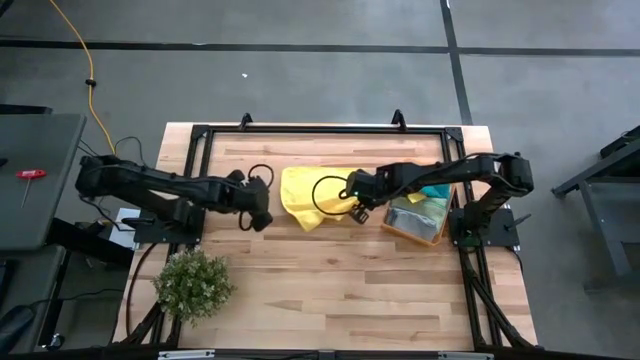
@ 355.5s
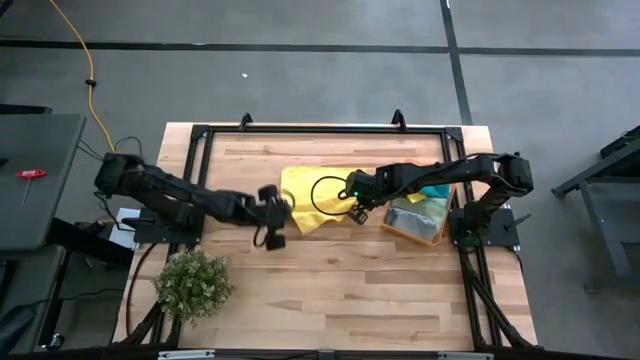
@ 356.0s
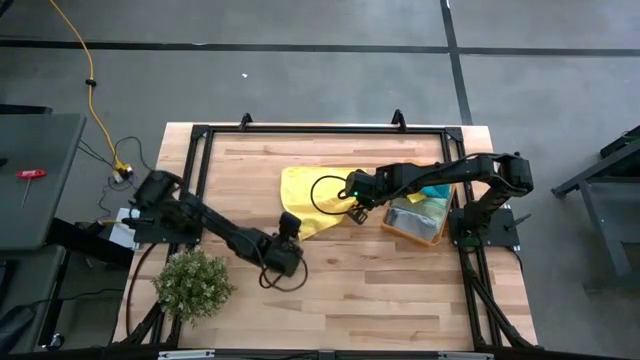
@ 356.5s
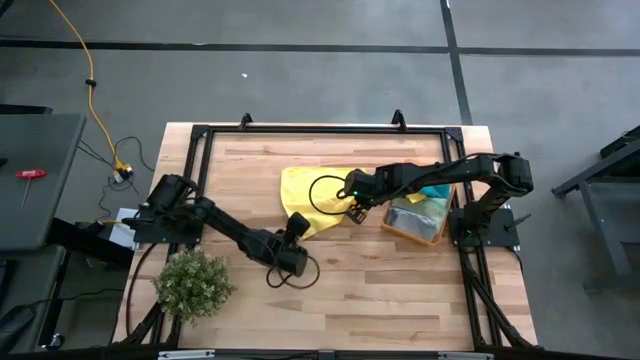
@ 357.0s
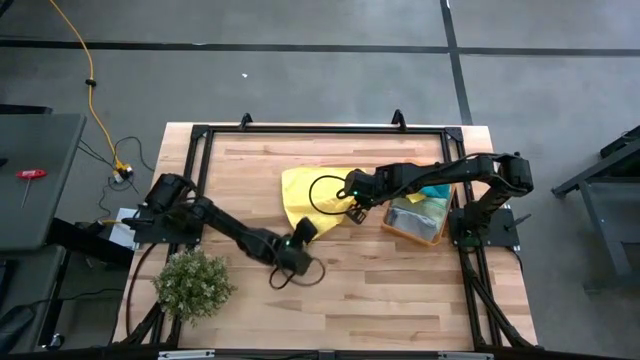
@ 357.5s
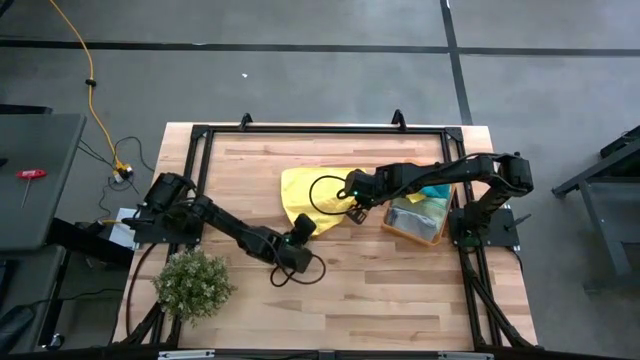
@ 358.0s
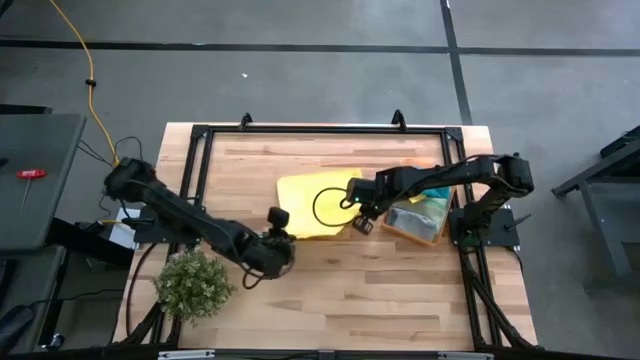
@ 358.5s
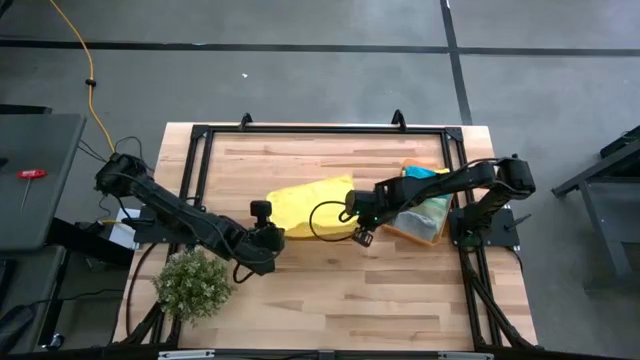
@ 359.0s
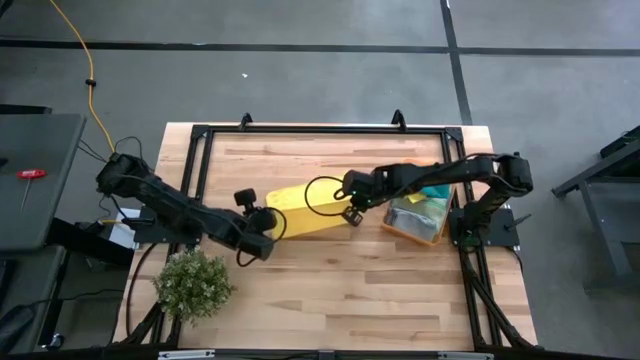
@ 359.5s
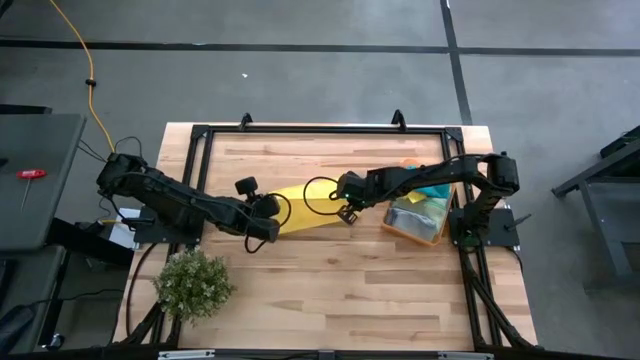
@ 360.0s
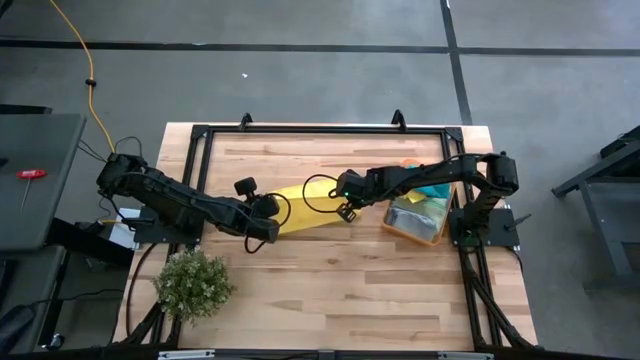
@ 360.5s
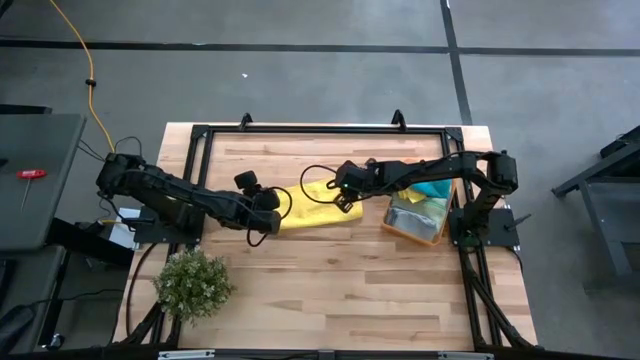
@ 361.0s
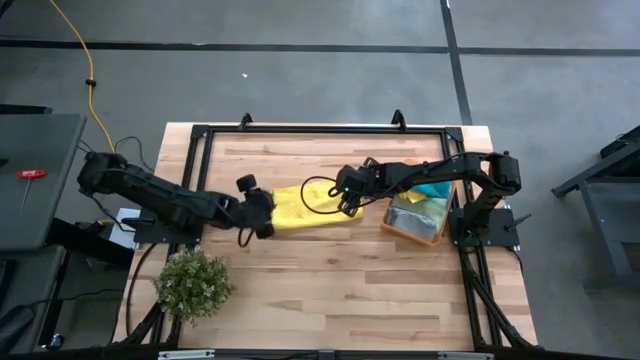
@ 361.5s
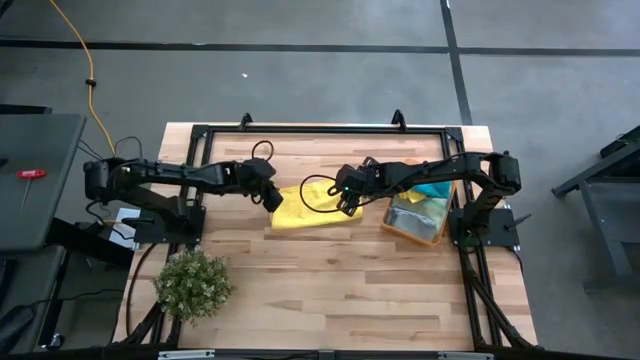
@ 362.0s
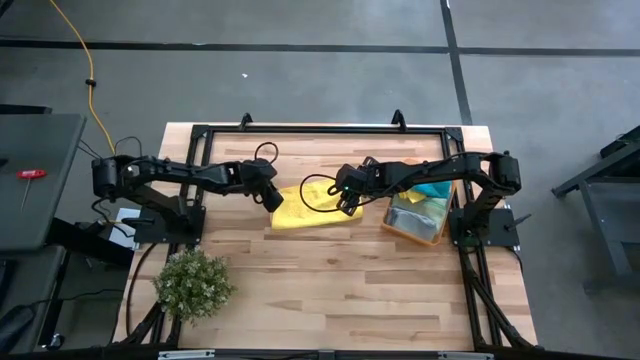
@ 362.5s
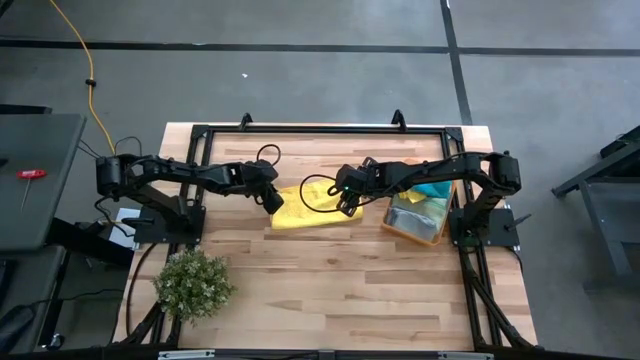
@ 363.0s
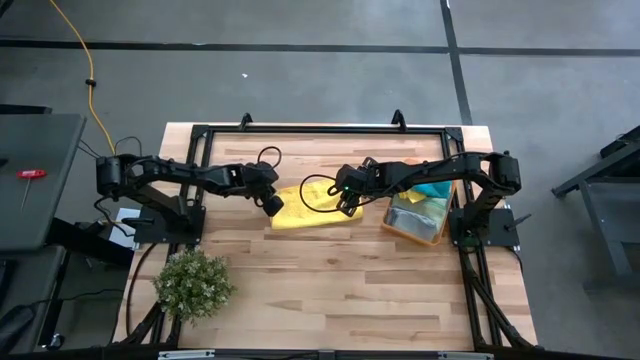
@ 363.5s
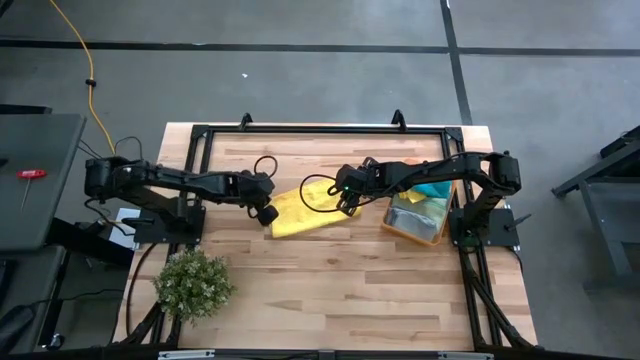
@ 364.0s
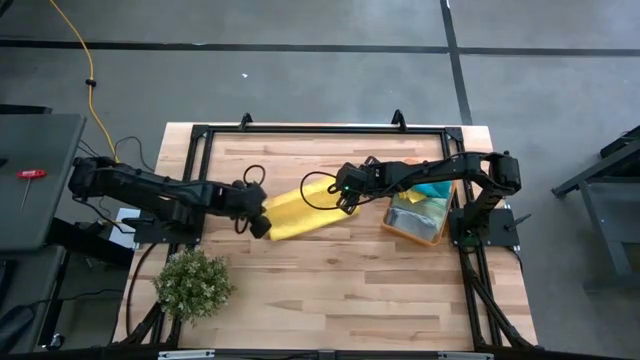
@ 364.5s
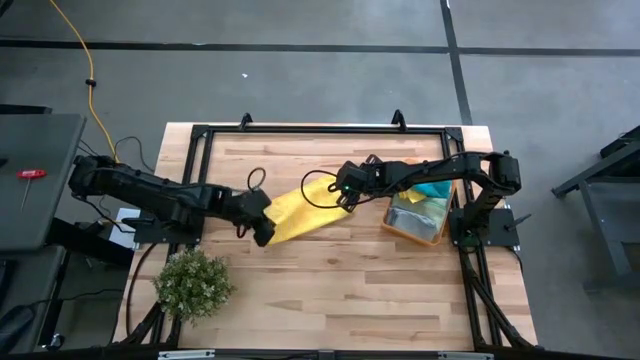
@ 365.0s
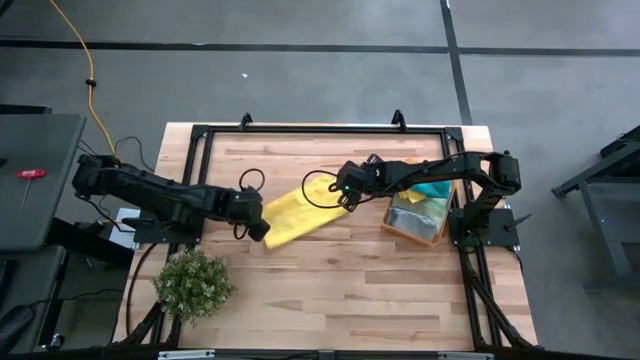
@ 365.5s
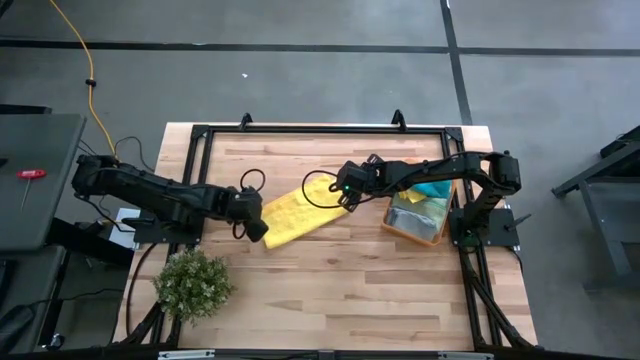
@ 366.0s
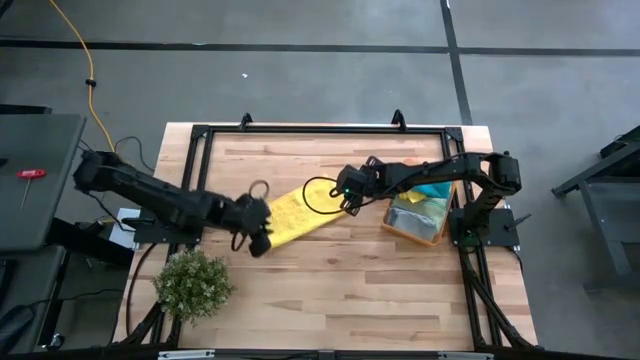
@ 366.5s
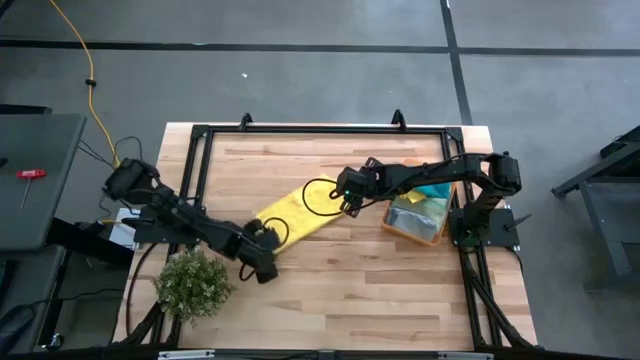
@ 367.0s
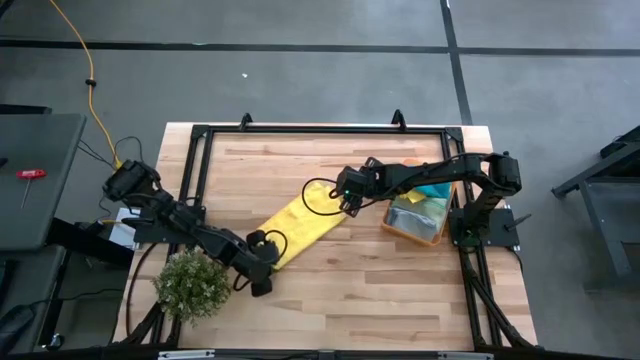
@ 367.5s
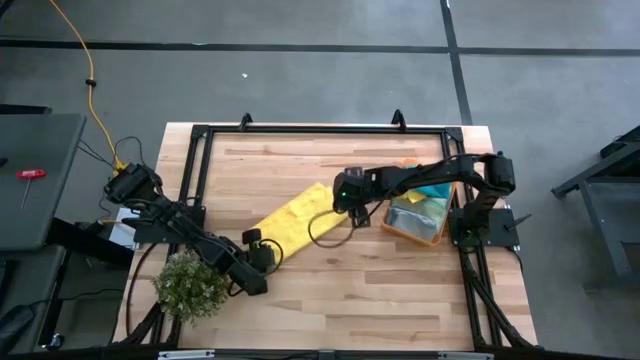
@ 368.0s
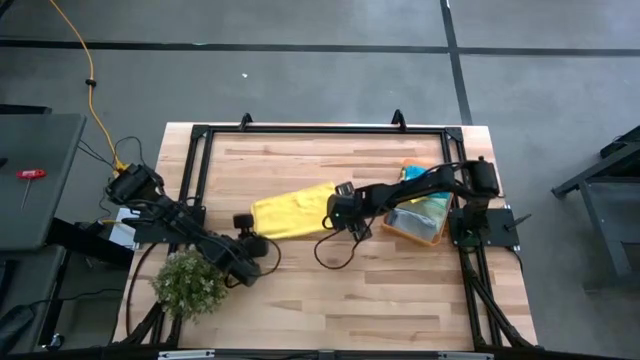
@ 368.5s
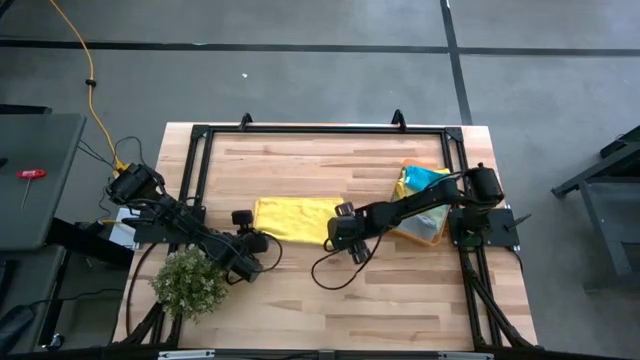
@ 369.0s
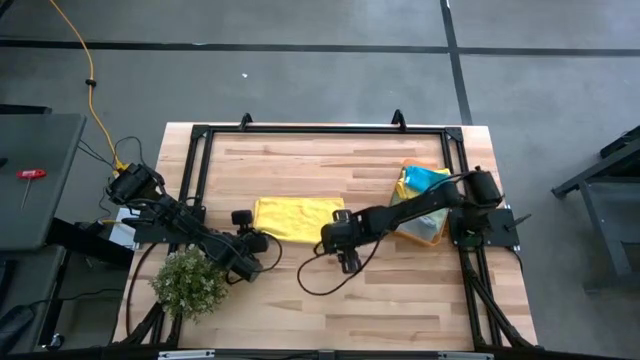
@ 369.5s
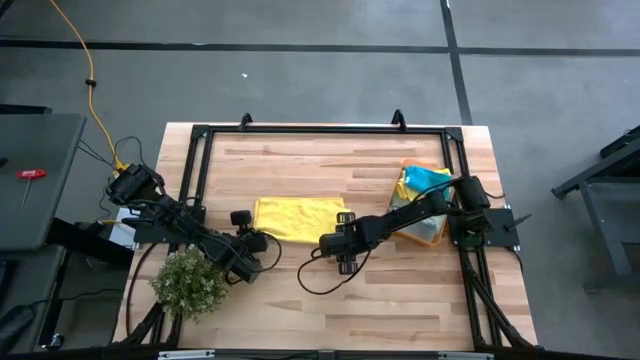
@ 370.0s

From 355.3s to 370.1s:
Task: Fold microfiber towels
Fold the yellow microfiber cloth

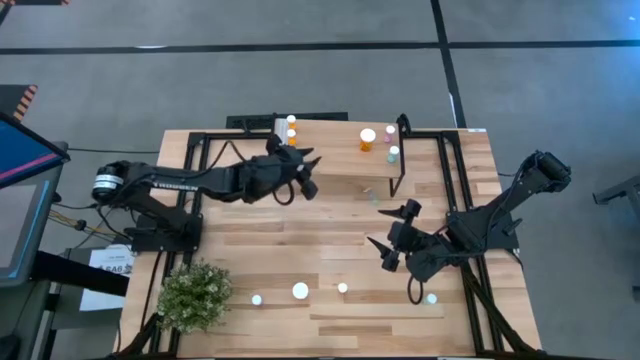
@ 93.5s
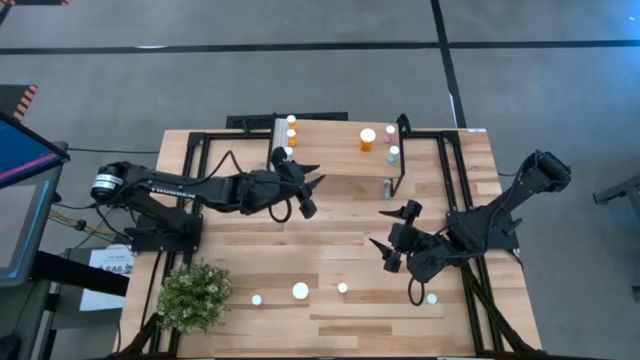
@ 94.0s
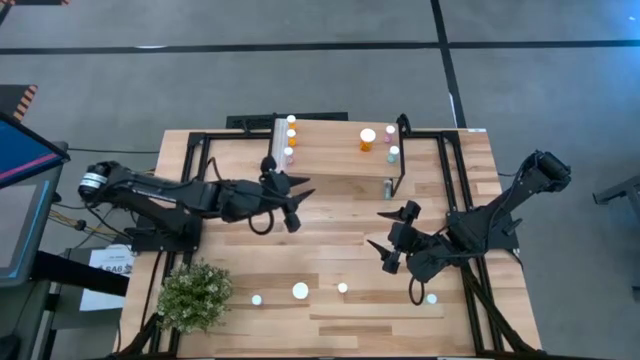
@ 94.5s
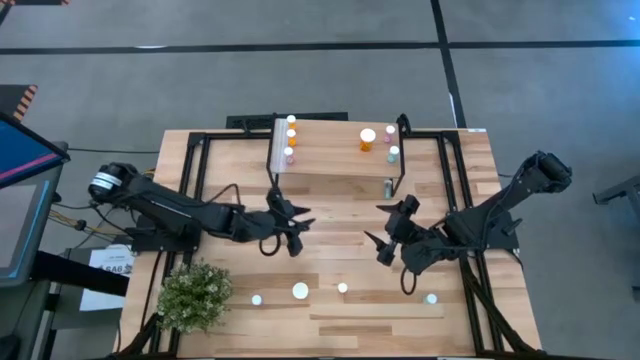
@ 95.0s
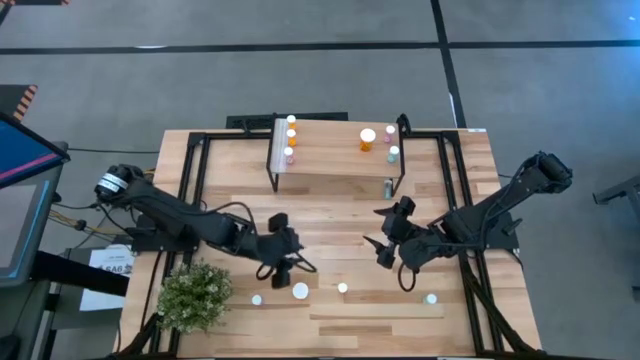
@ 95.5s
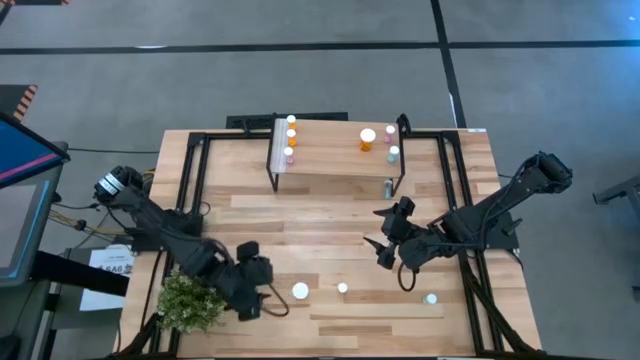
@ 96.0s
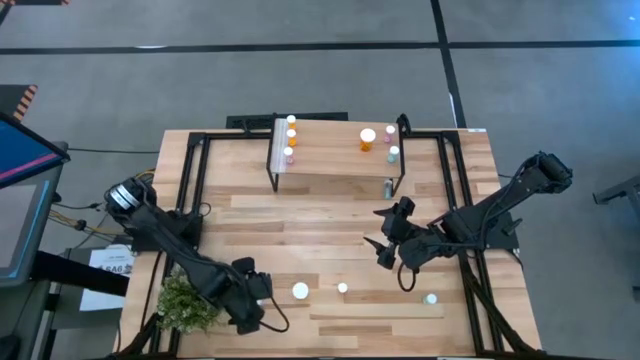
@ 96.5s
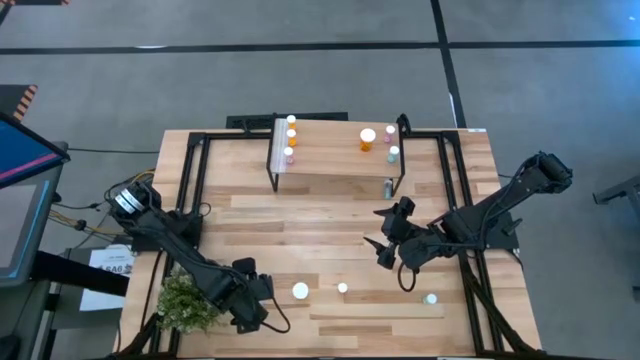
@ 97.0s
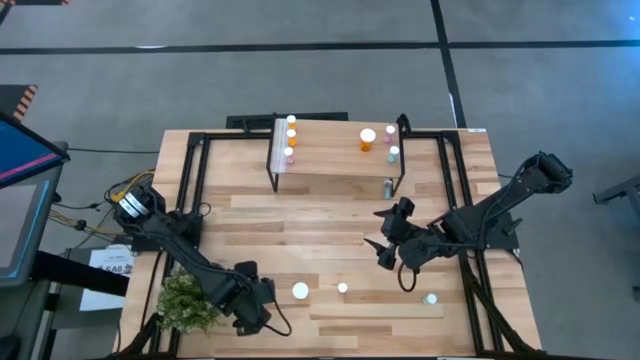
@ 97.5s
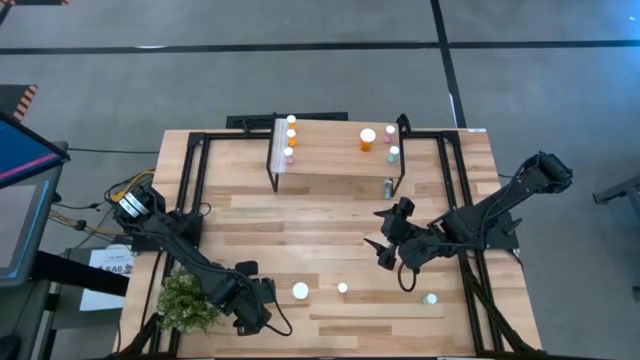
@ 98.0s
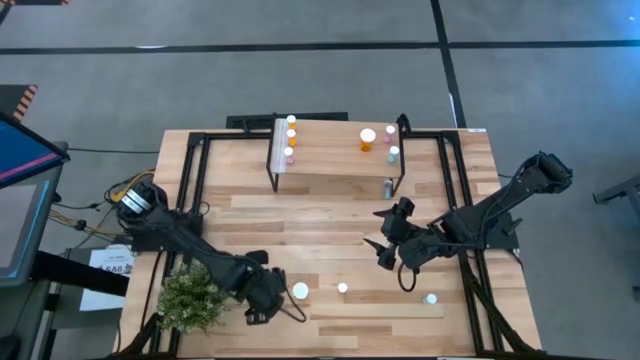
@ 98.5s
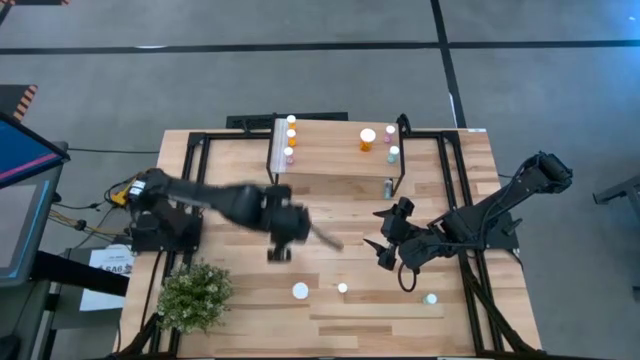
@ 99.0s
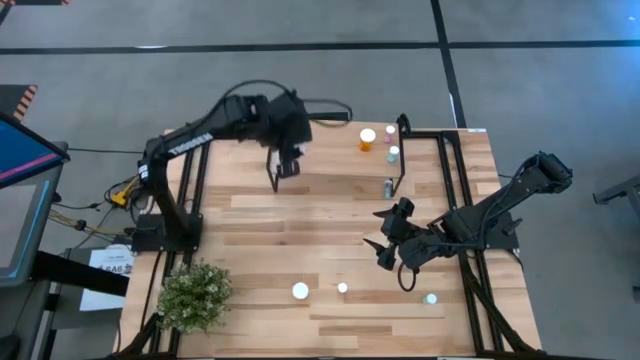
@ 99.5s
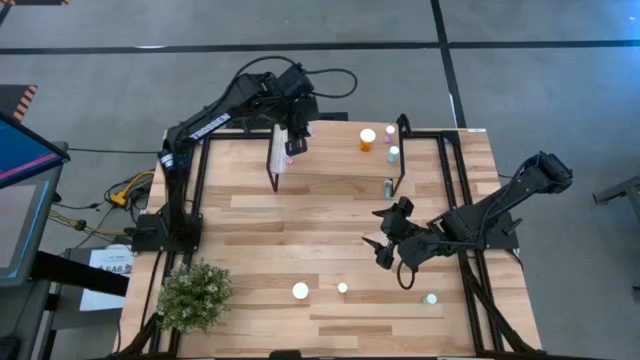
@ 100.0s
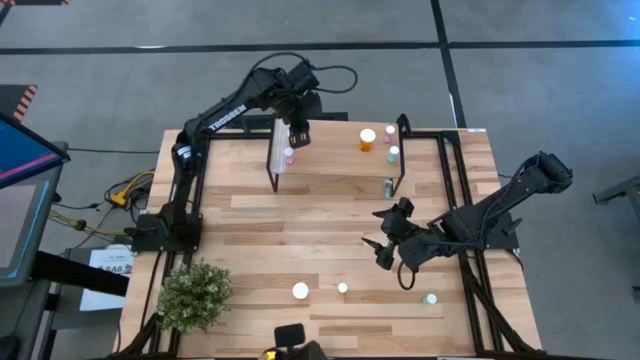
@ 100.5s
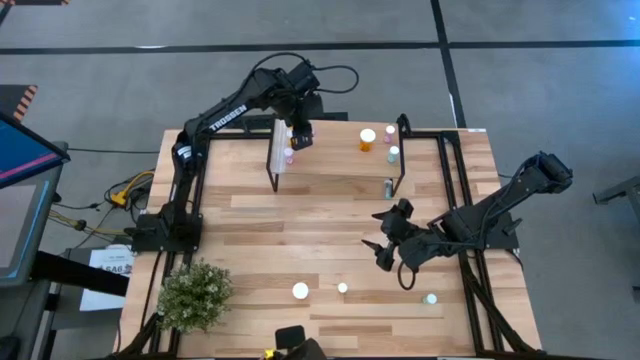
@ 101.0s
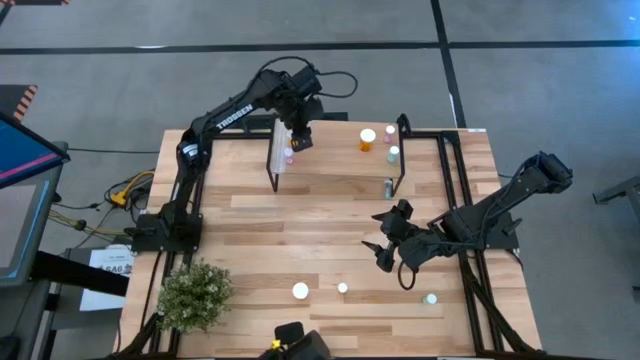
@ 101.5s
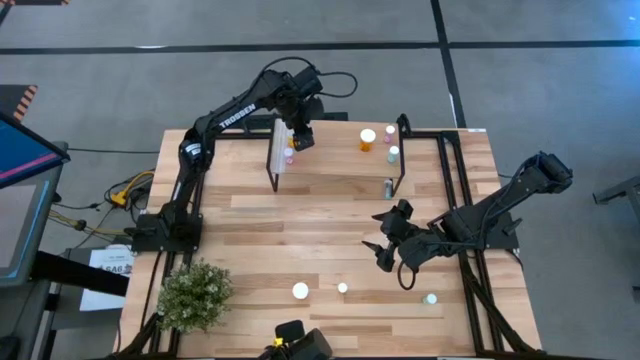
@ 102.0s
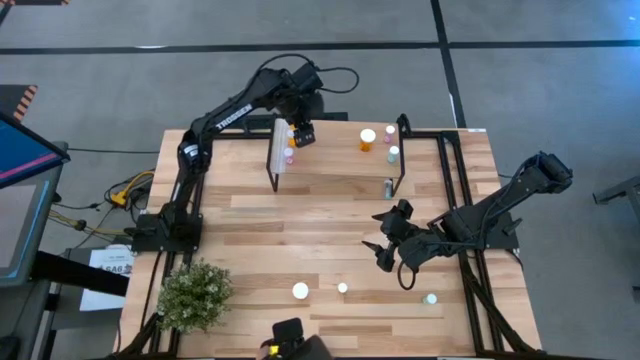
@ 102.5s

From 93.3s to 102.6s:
Task: Pick and place medicine bottles onto shelf by color
Put the small pink pill bottle on the shelf
